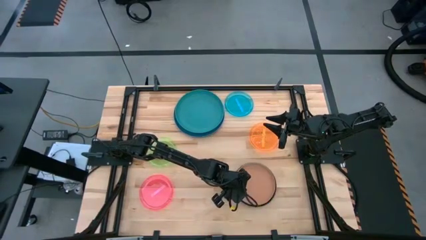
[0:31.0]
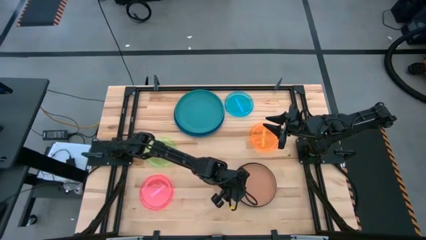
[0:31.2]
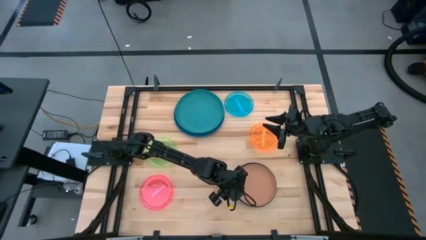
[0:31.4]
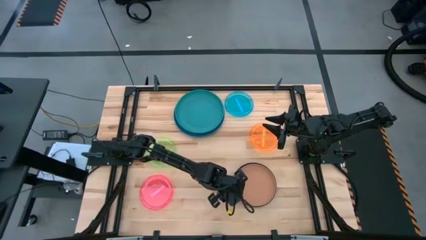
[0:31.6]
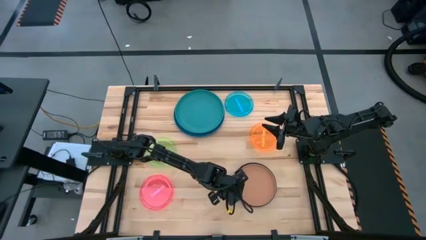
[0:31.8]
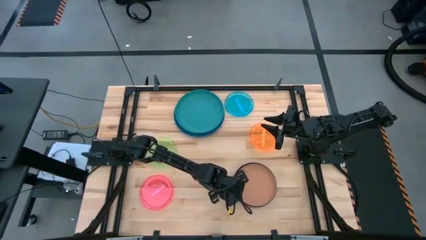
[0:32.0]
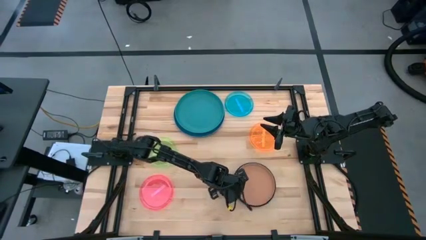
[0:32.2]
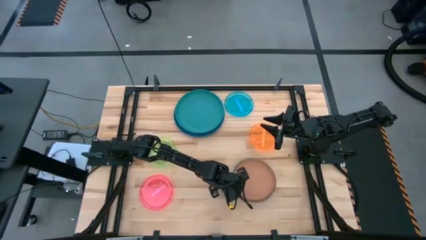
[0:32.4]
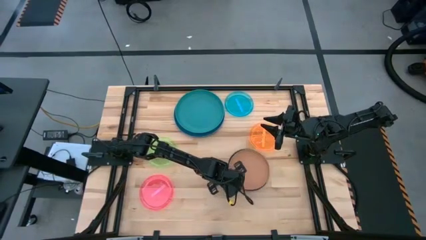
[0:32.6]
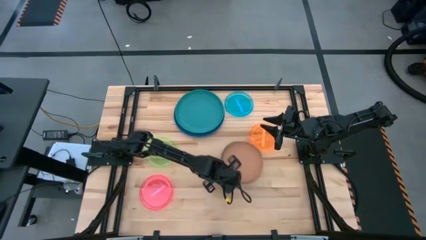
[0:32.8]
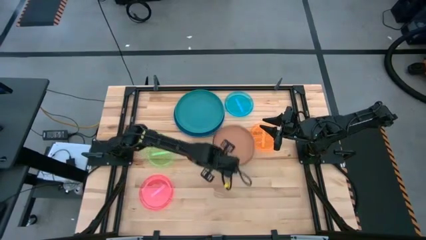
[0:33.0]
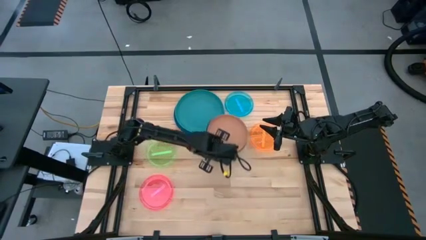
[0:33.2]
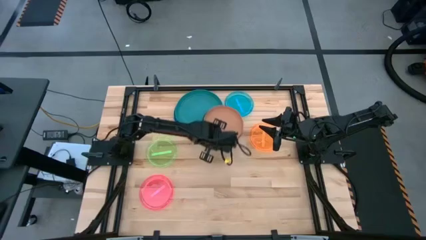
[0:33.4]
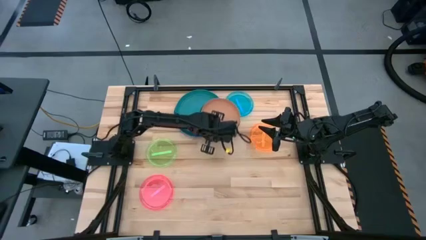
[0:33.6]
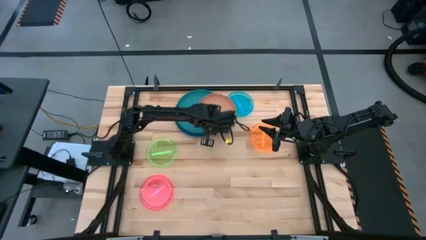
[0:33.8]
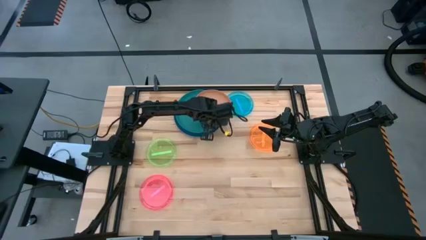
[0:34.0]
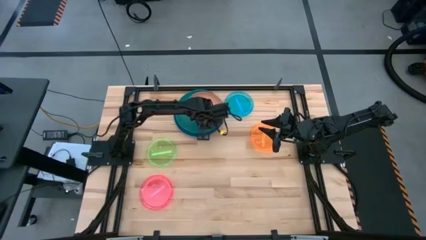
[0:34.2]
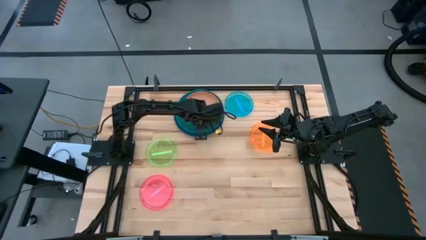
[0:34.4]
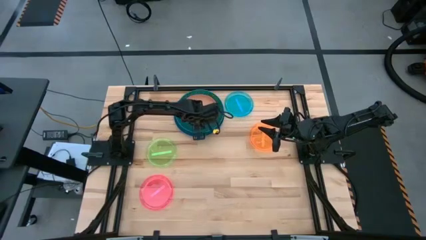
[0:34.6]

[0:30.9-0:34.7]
Task: Stack plastic plates
Stack the stacked plates on top of the green plate

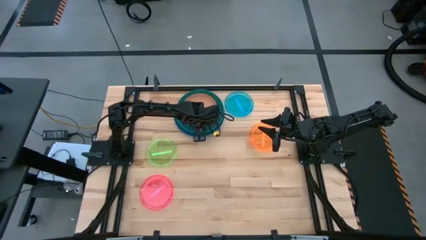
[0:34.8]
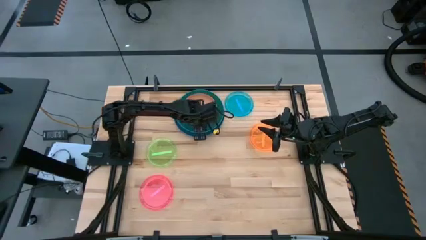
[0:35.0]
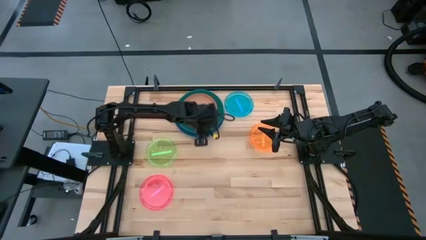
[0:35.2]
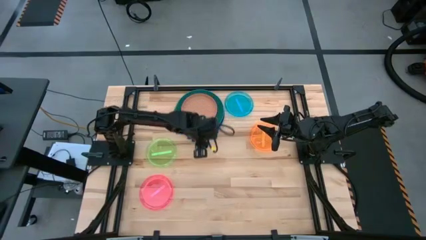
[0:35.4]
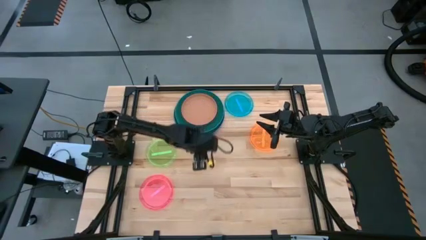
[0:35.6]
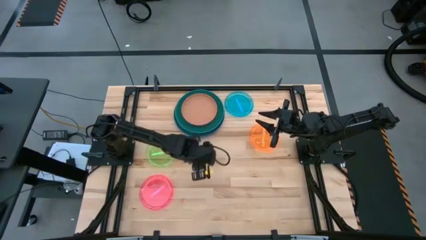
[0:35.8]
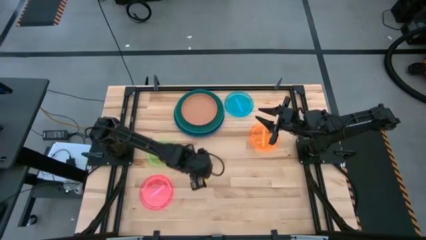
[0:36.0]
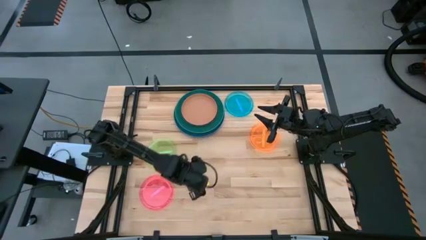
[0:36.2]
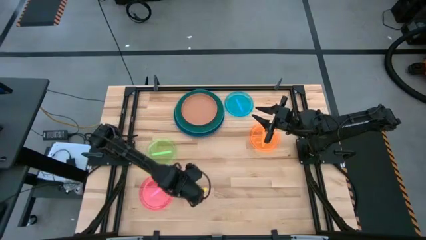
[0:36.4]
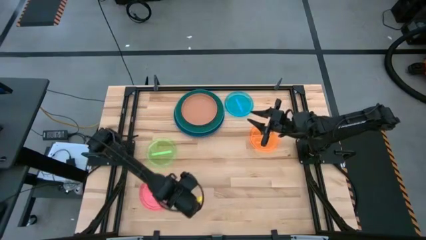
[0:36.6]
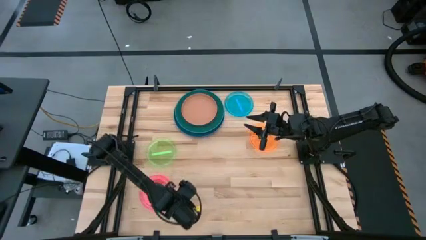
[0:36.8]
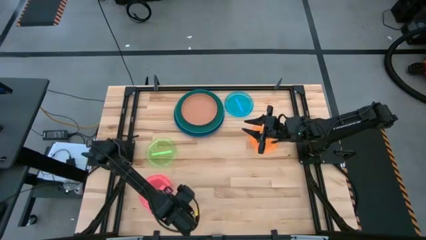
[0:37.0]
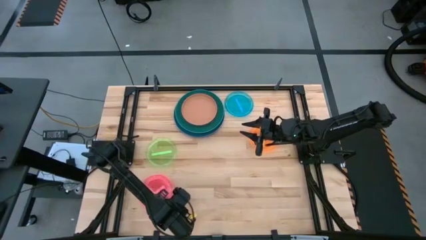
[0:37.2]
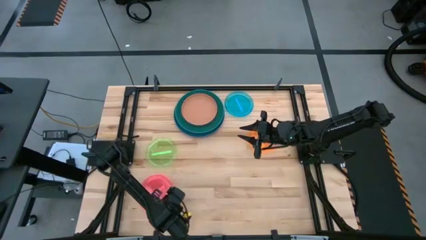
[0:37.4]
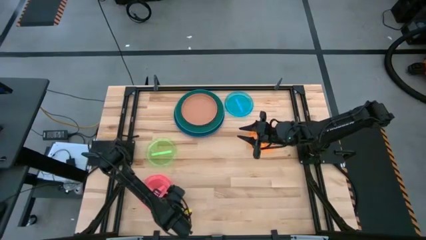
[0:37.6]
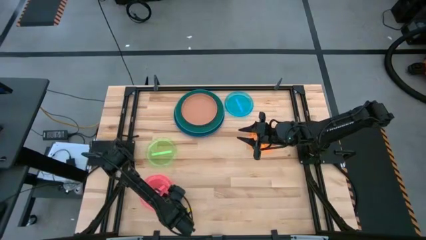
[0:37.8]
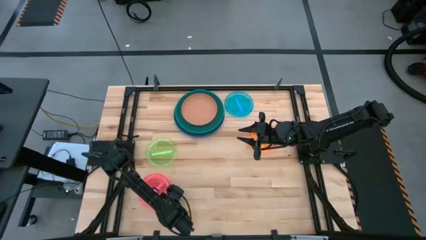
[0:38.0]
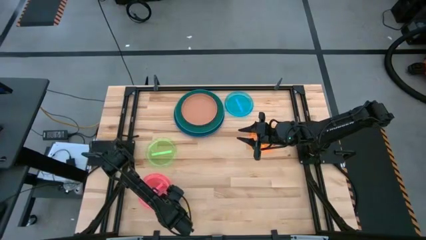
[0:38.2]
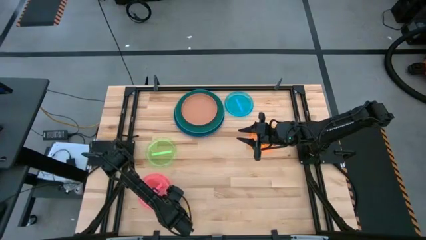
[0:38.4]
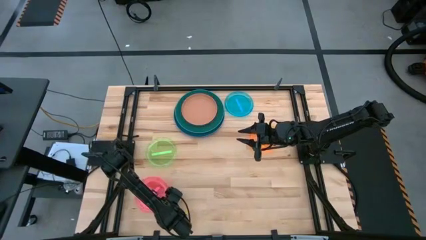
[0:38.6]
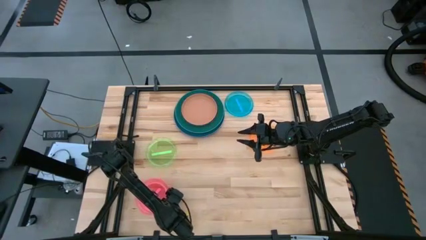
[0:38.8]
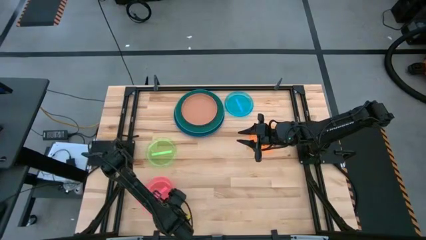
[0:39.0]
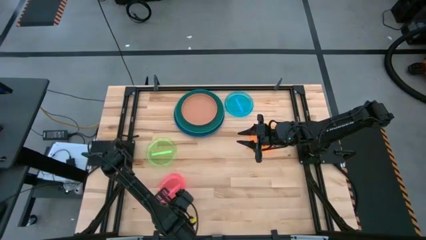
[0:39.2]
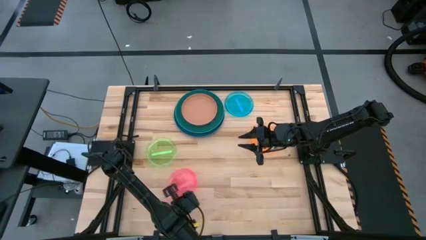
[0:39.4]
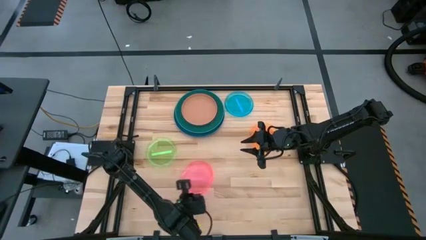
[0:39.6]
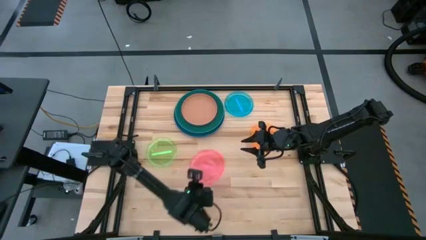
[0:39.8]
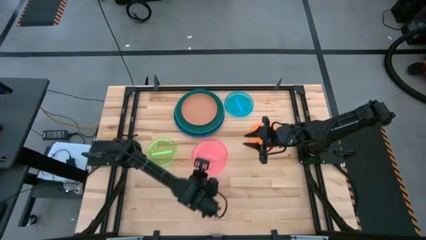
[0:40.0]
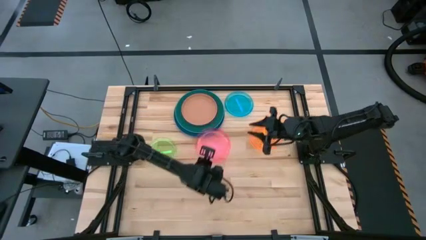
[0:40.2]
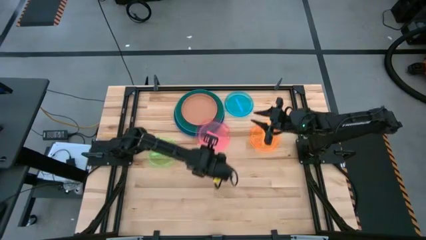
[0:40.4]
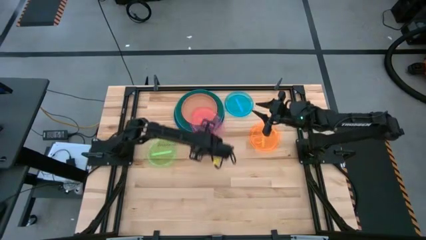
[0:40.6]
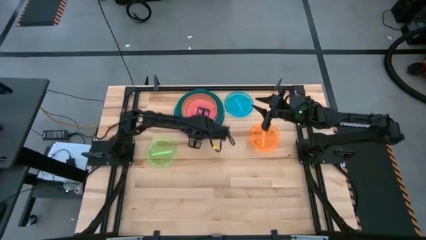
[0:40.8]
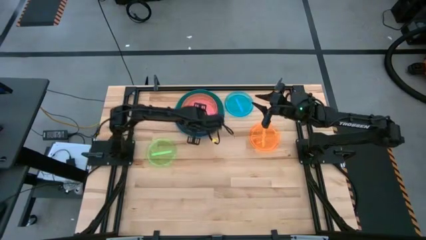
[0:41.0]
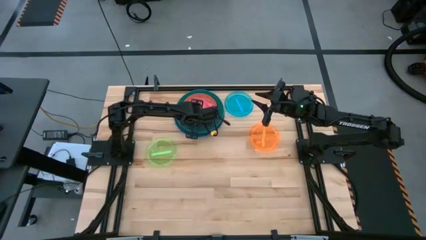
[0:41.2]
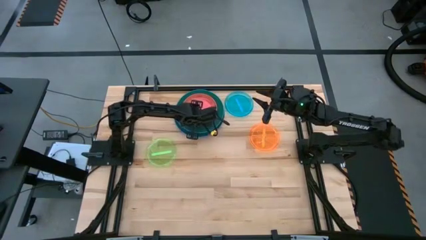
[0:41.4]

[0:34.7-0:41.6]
Stack the pink plate on top of the brown plate

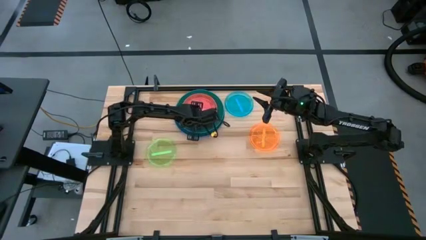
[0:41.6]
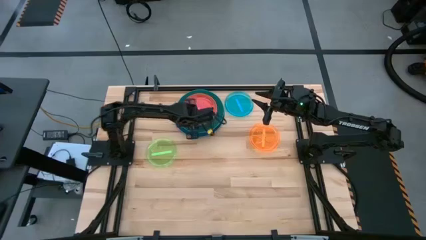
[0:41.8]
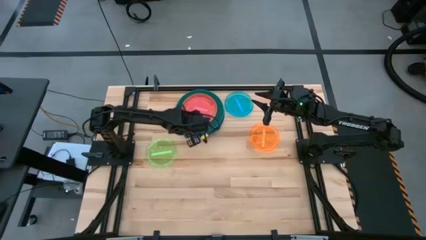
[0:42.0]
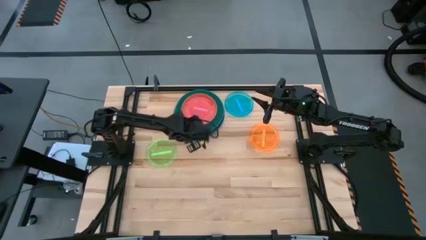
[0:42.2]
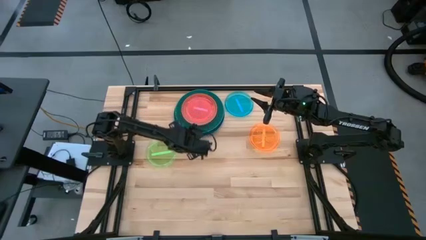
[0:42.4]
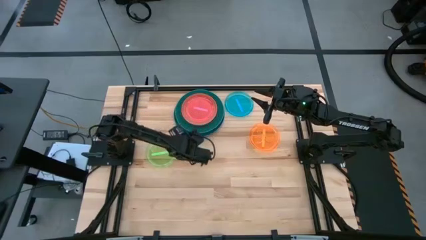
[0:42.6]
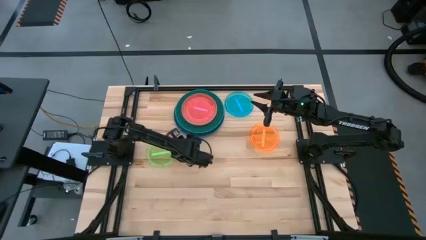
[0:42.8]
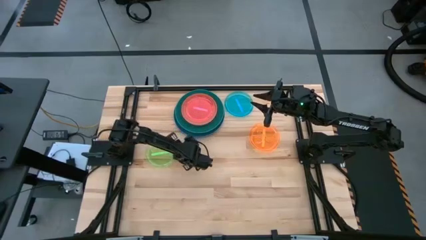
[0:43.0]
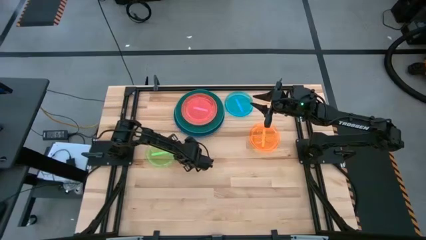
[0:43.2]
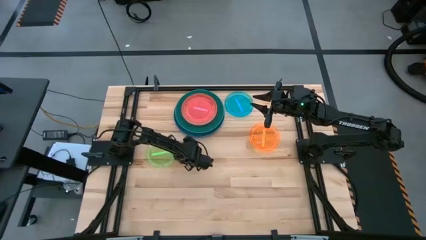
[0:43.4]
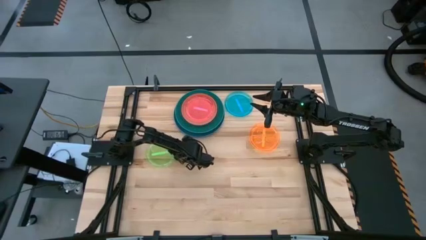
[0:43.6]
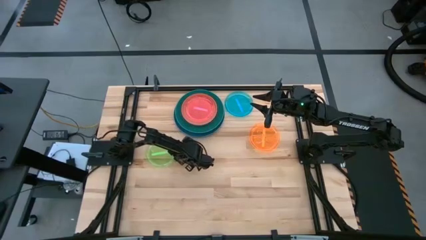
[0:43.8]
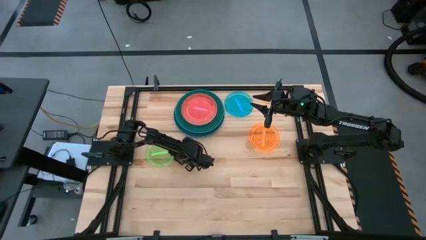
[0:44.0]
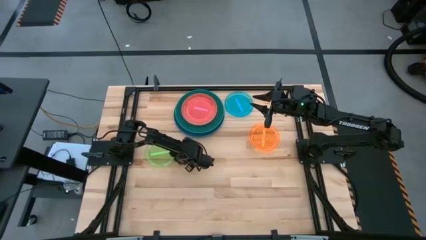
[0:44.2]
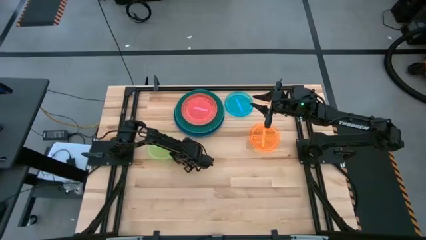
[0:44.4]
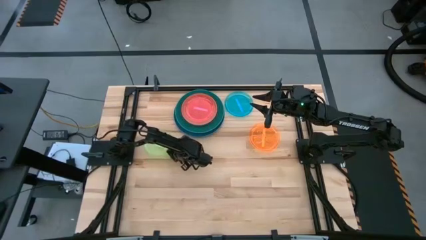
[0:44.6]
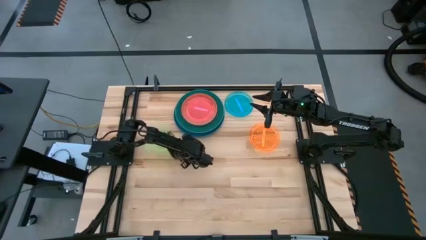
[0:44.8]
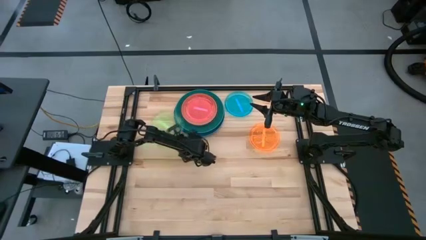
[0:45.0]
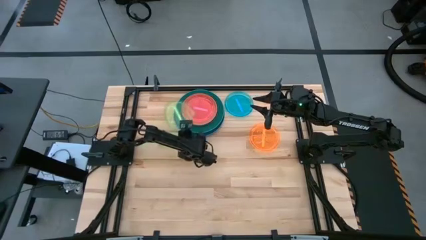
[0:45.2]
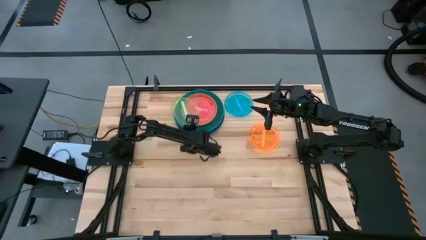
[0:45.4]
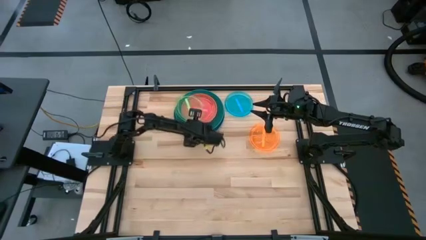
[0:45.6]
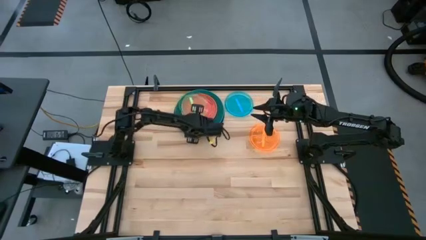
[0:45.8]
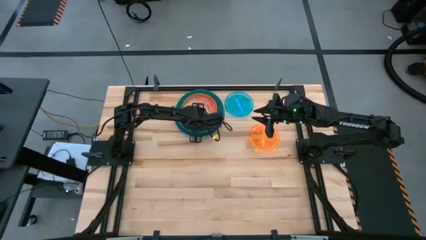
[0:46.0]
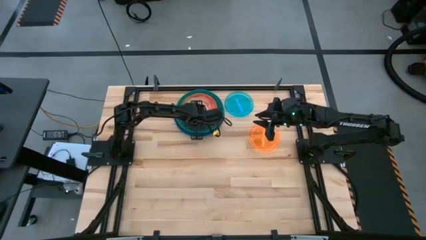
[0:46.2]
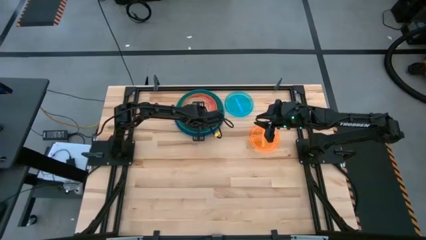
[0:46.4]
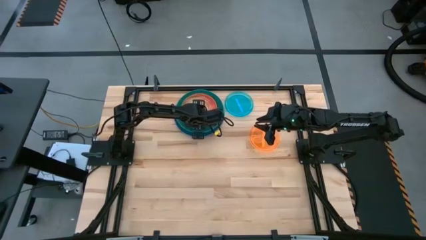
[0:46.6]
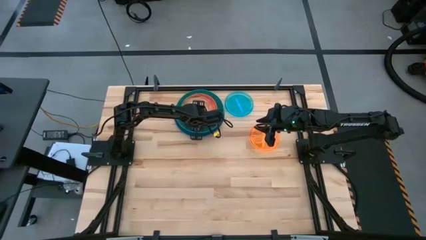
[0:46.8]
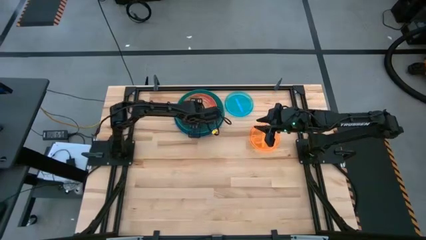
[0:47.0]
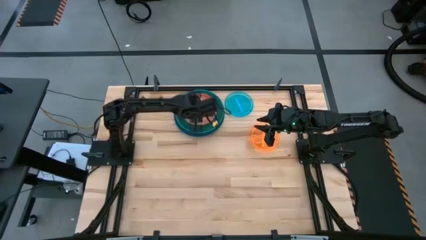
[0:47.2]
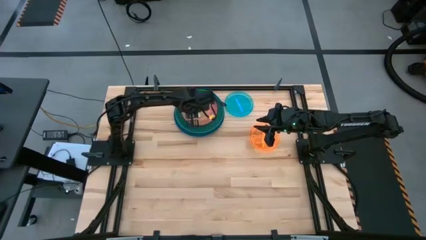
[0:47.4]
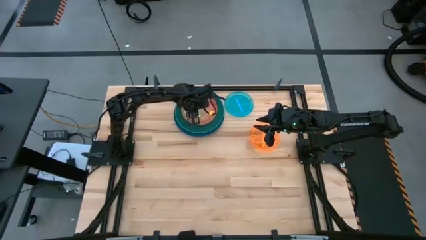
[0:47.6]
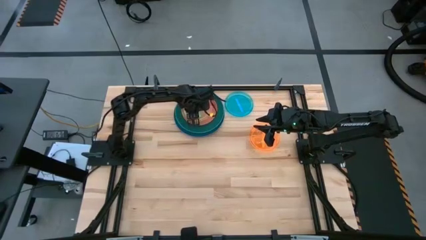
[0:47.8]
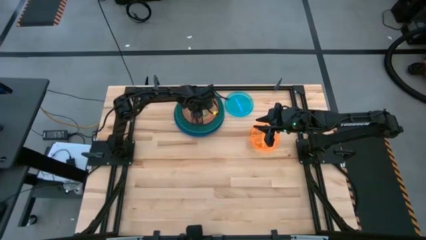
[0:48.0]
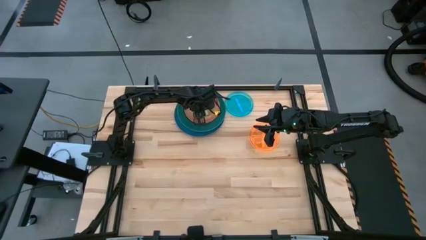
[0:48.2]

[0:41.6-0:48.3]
Stack the light green plate on top of the pink plate
